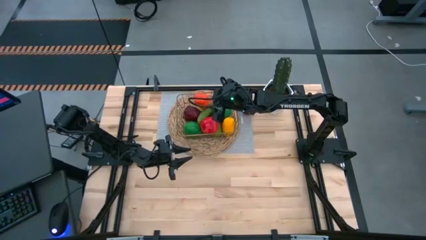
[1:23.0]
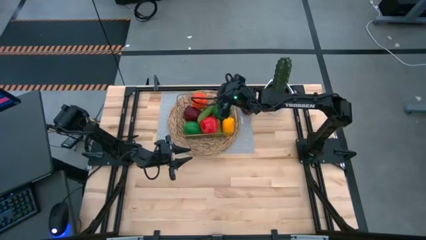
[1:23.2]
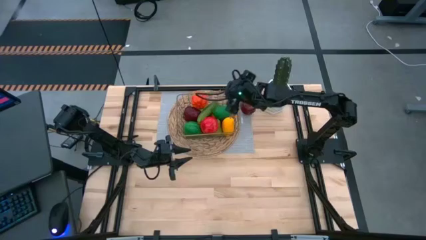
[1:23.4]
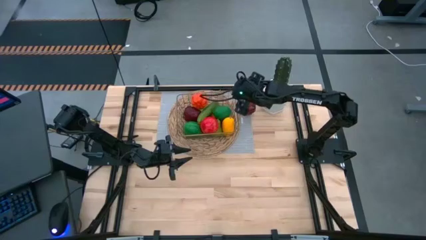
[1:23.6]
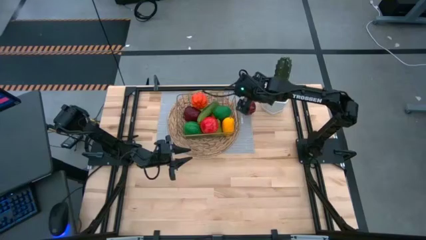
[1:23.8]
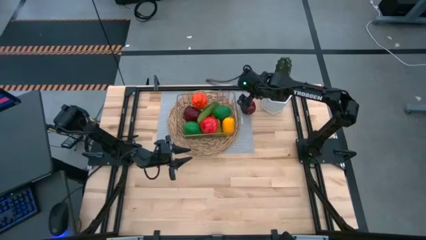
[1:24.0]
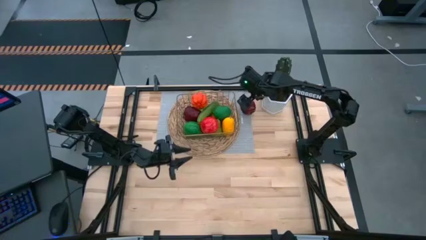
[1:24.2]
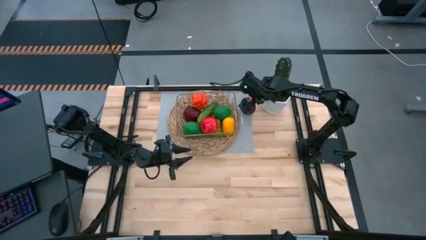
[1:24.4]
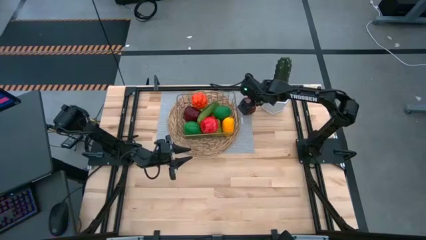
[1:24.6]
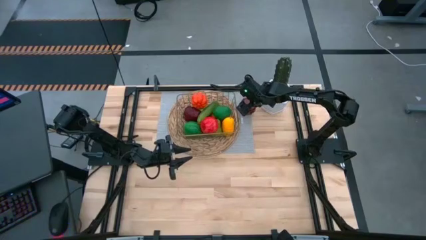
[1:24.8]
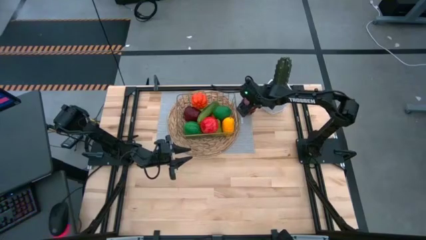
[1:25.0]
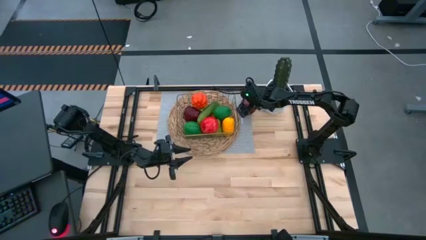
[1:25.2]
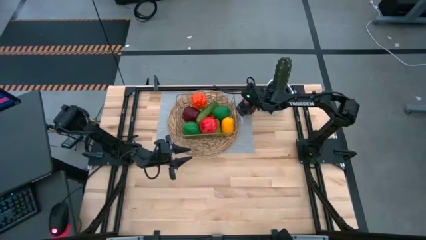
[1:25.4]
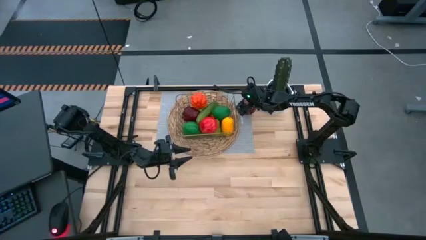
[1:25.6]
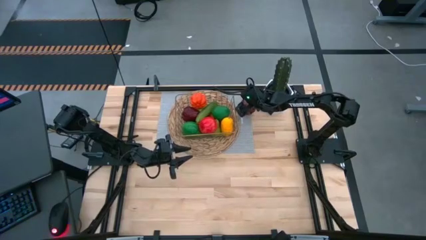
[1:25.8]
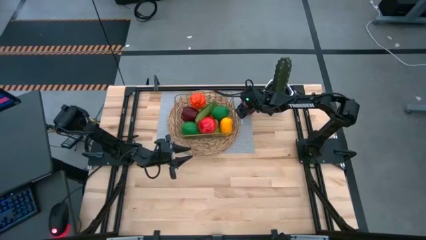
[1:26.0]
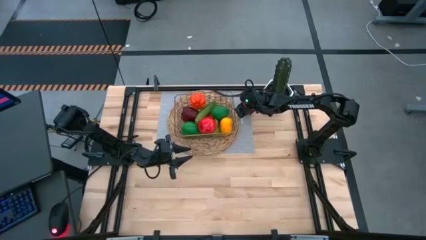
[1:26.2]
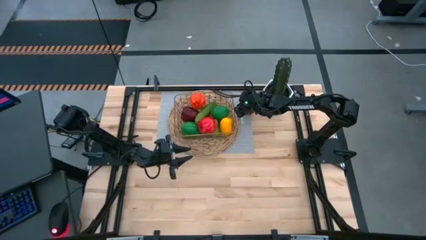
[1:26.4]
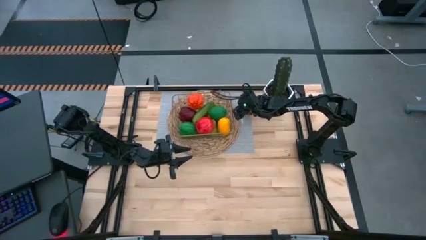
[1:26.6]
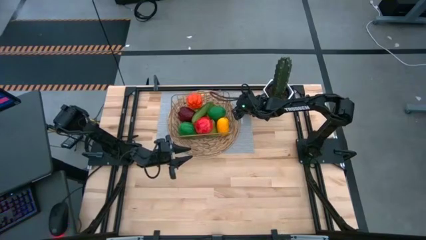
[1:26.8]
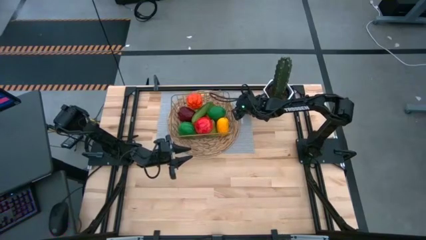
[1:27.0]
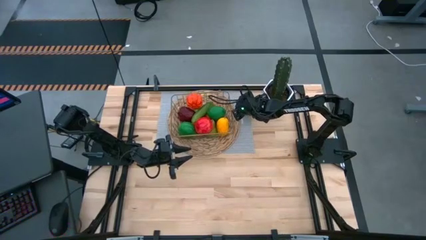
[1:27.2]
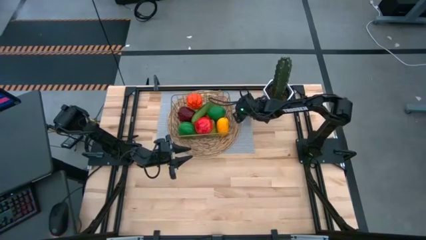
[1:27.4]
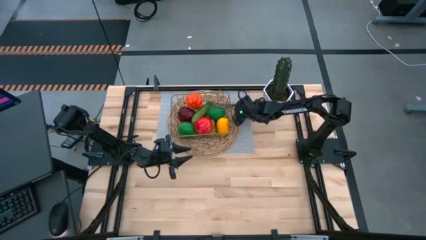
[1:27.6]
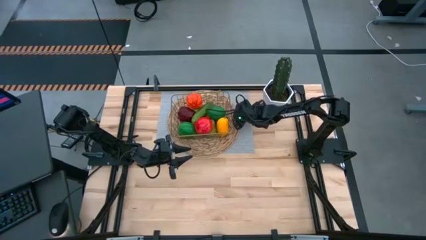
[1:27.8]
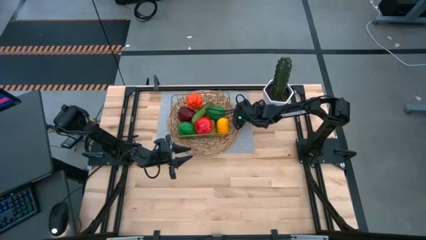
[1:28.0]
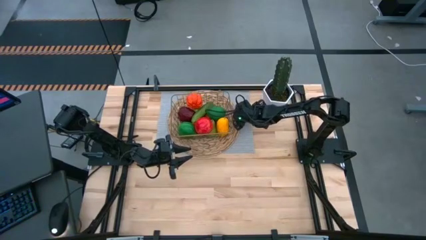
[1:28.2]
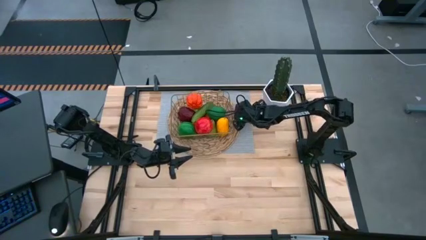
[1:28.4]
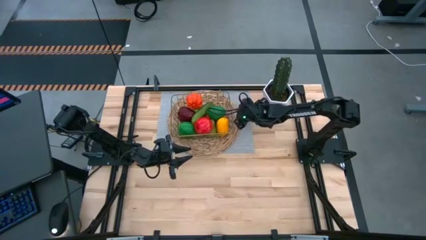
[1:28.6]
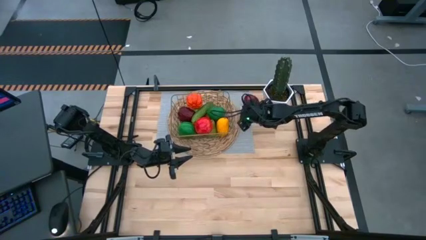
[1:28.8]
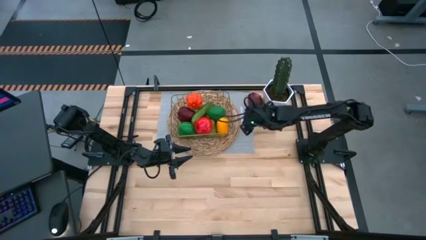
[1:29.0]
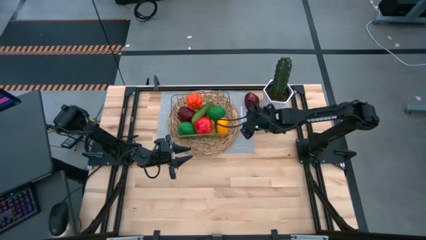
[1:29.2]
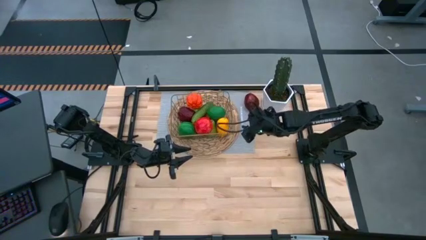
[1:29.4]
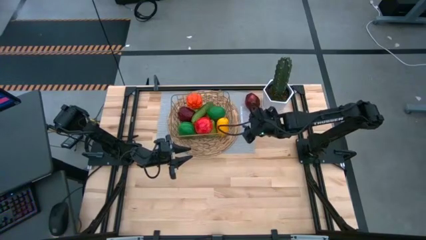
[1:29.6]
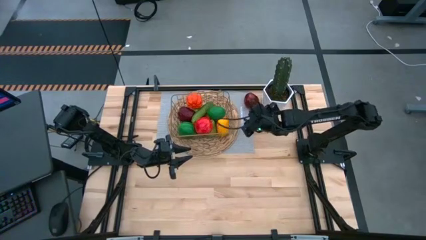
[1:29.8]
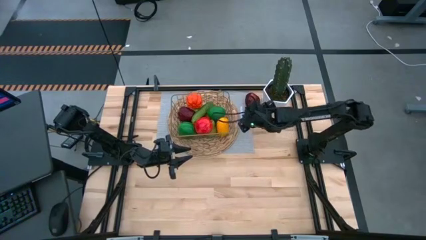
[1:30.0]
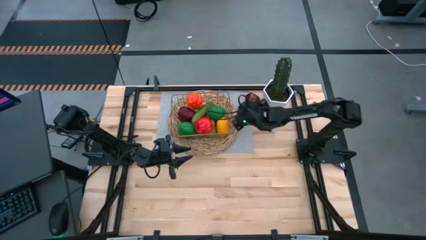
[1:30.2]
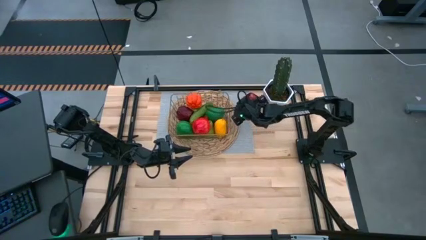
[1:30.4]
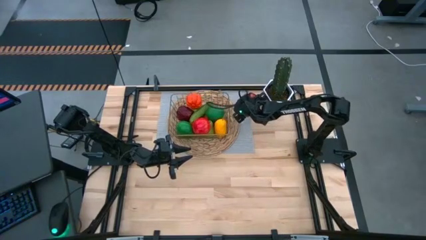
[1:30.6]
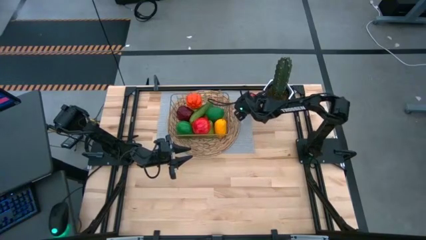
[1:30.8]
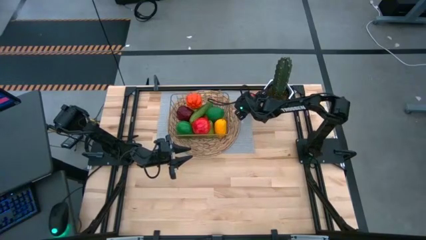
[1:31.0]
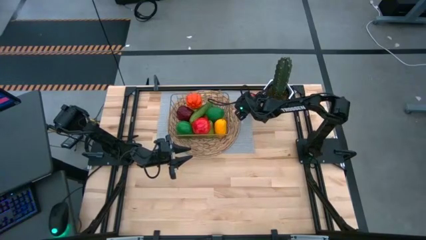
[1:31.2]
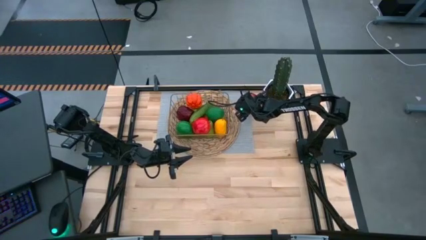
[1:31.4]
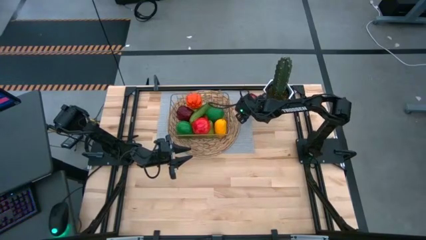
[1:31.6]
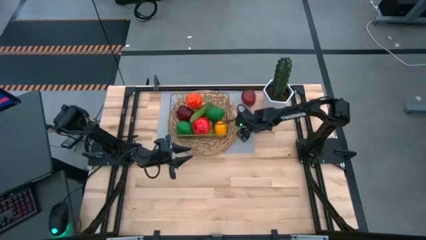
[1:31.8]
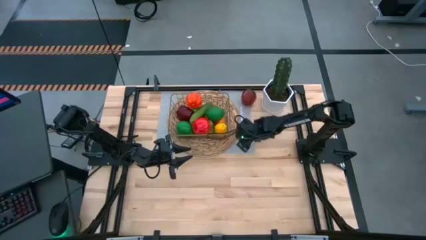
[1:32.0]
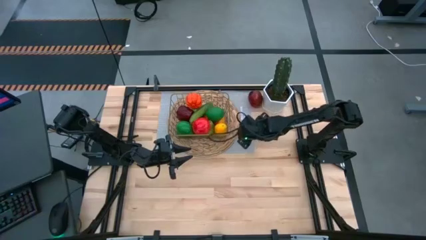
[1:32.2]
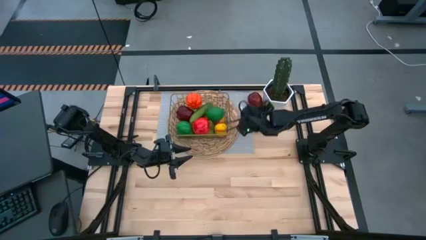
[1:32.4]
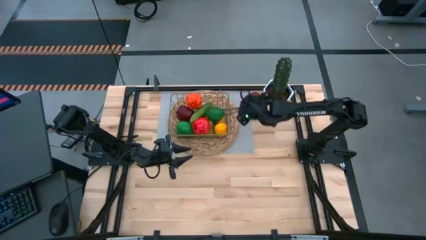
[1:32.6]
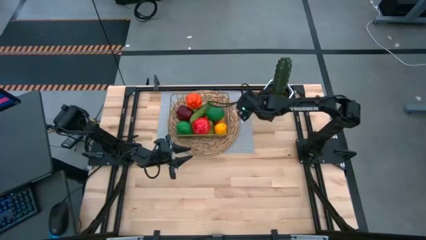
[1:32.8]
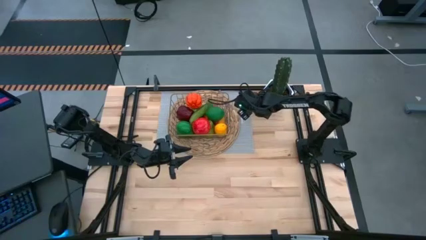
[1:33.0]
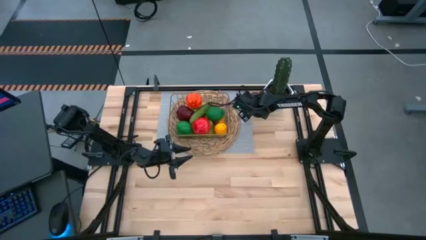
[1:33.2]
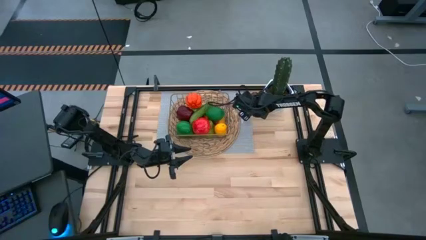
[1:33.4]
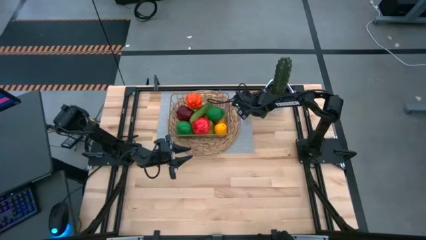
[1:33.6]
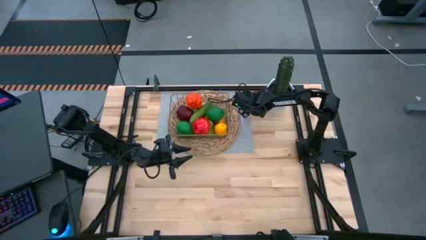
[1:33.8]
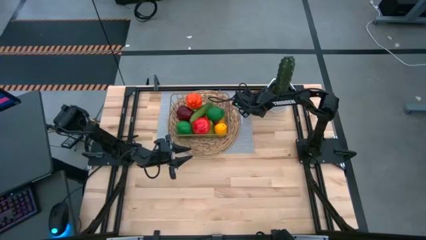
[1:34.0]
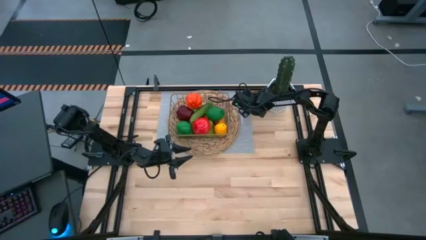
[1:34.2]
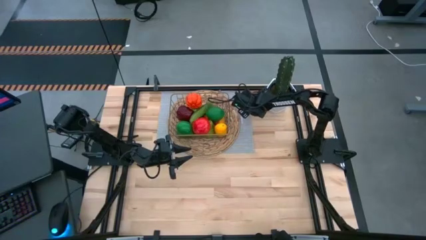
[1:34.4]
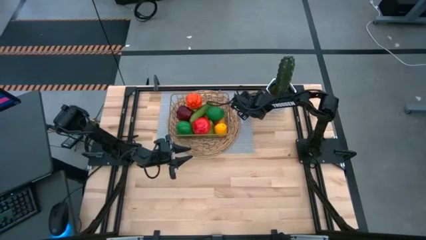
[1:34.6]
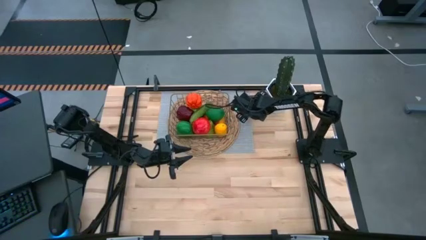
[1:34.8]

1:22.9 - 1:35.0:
Task: Build produce basket
Put the dark red apple into the gold wire basket

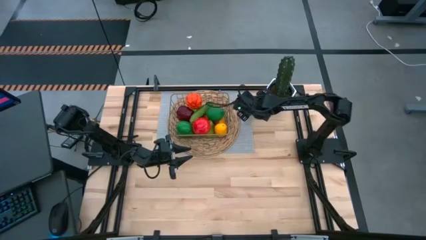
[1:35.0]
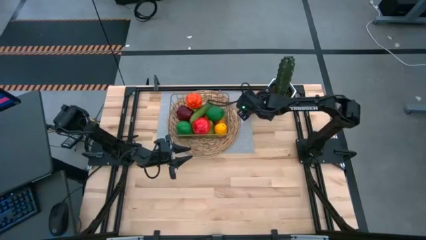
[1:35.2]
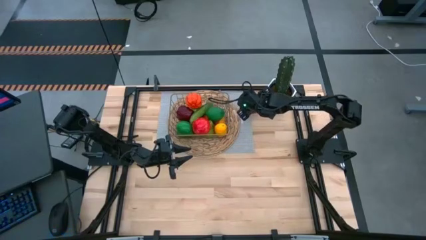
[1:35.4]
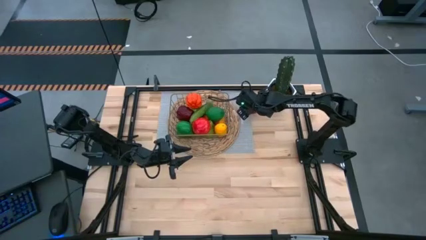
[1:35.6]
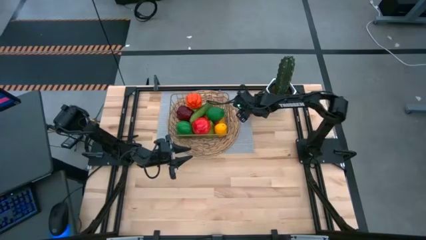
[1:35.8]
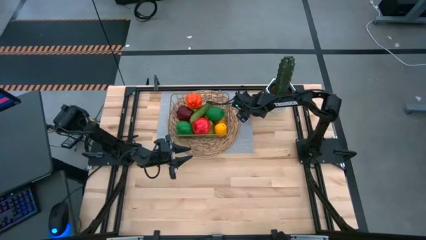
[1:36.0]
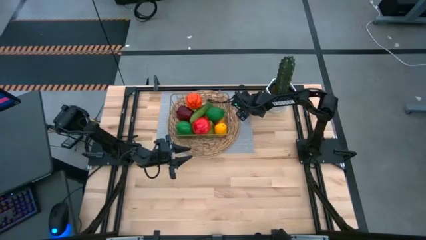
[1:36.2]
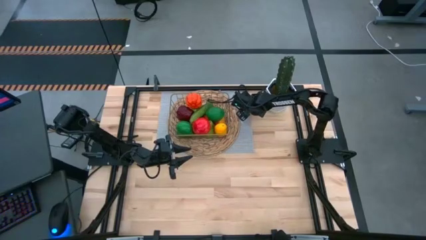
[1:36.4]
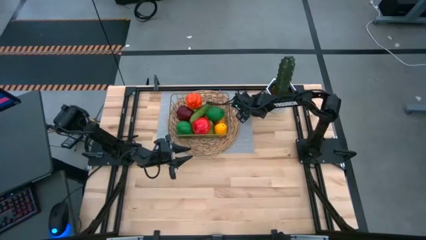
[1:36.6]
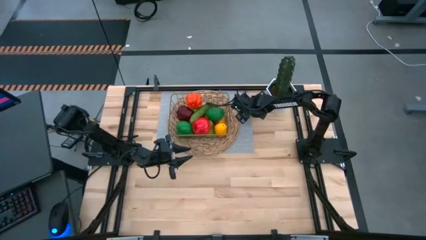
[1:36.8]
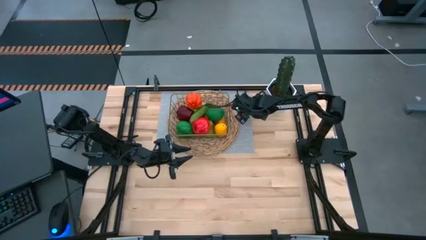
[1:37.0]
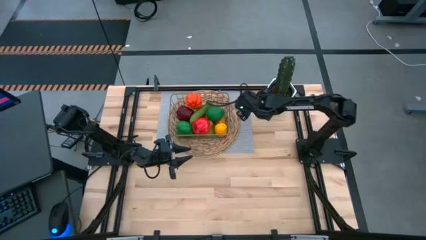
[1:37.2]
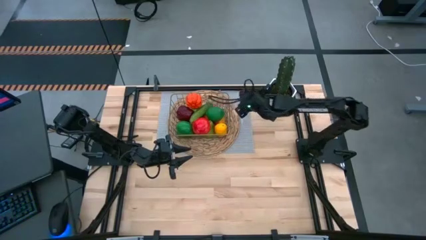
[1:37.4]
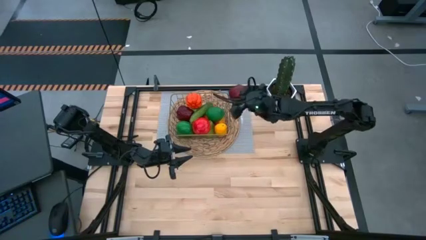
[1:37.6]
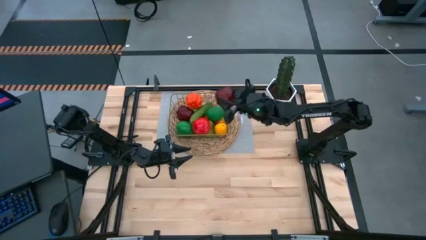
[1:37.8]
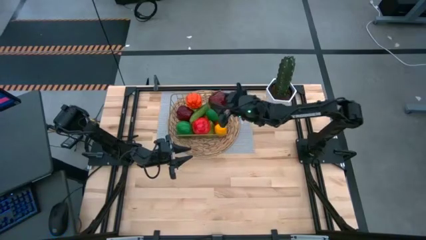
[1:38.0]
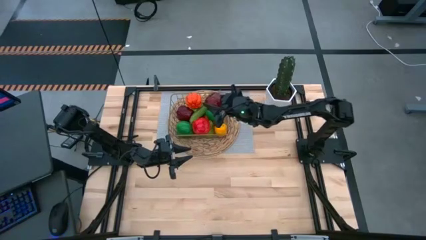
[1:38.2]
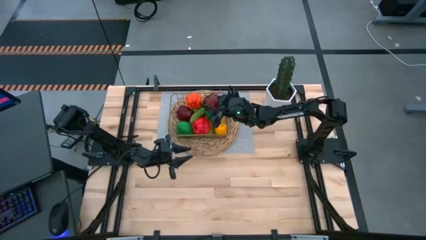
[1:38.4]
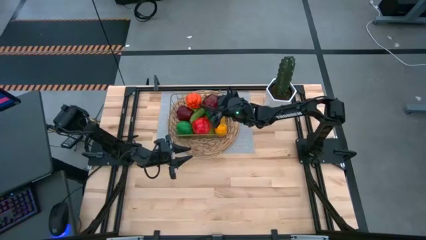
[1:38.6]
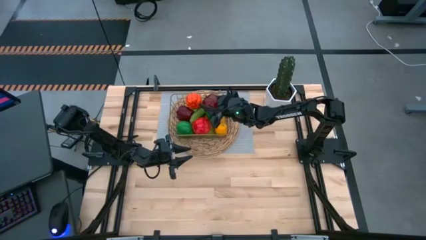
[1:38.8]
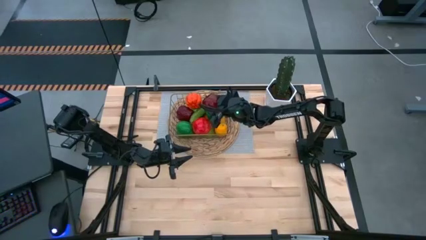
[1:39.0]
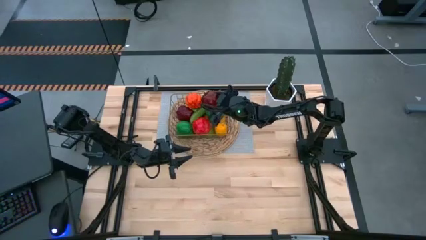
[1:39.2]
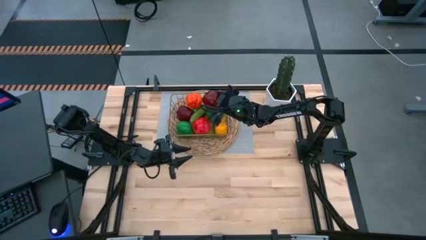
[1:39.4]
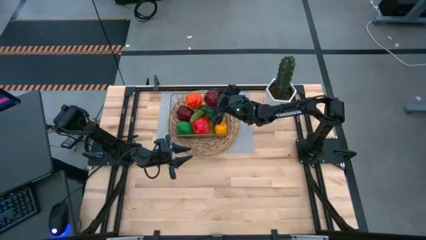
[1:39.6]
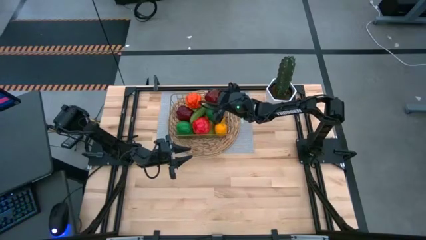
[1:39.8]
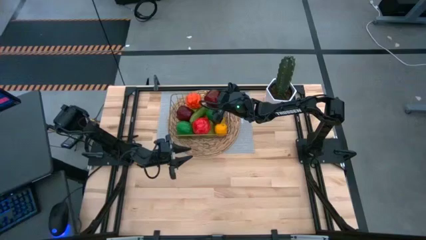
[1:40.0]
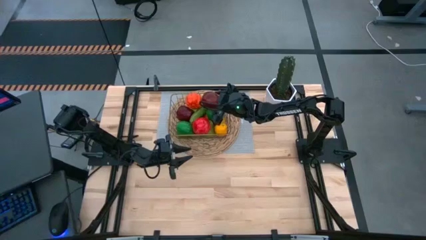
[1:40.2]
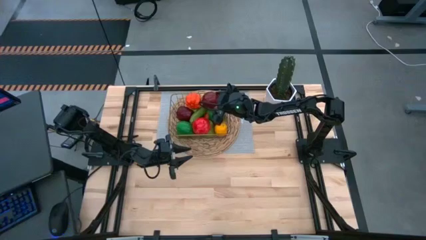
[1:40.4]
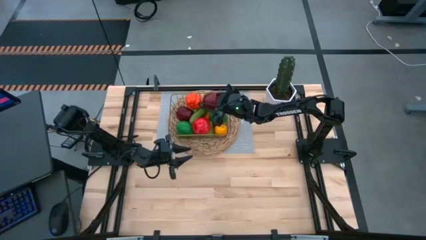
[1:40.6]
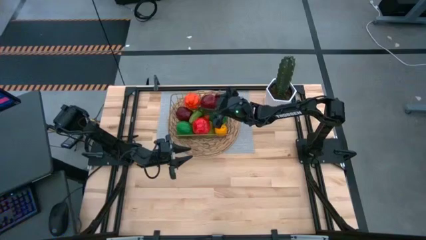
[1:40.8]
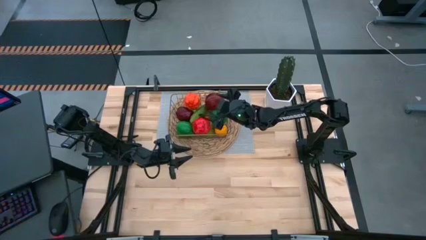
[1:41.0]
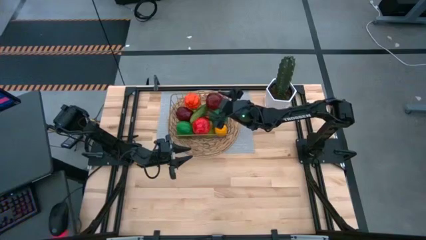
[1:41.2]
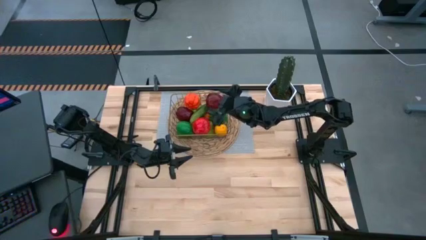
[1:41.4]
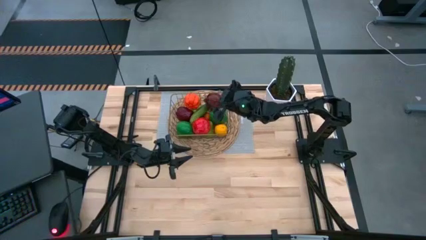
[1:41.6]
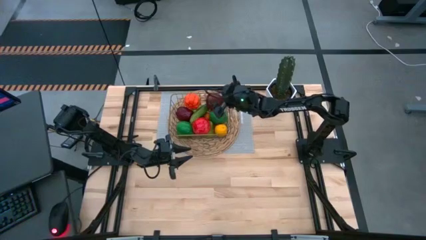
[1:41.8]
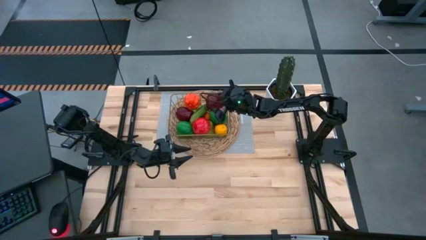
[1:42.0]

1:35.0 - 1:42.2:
Put the dark red apple into the gold wire basket
